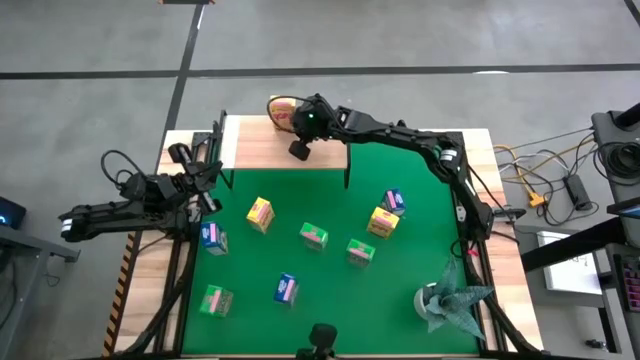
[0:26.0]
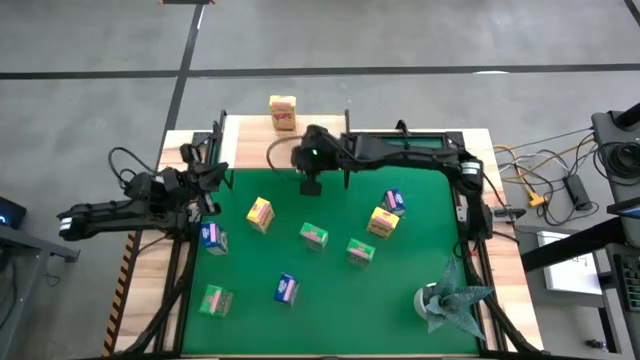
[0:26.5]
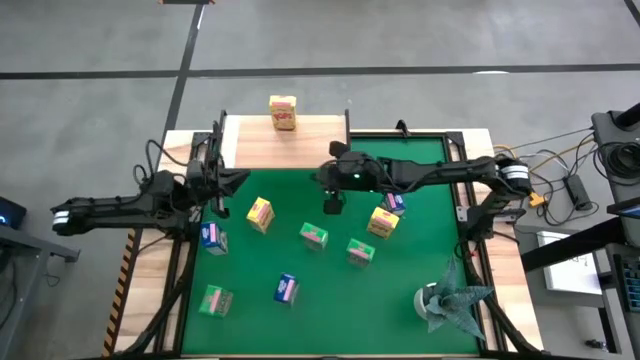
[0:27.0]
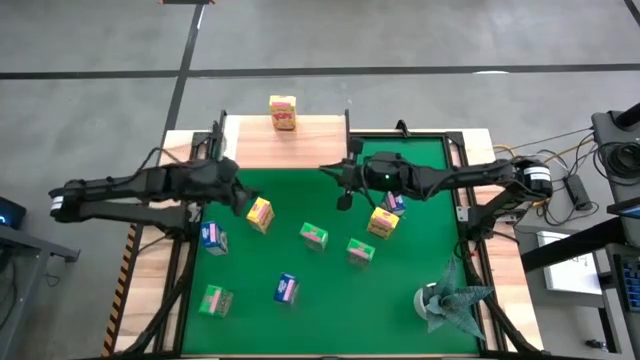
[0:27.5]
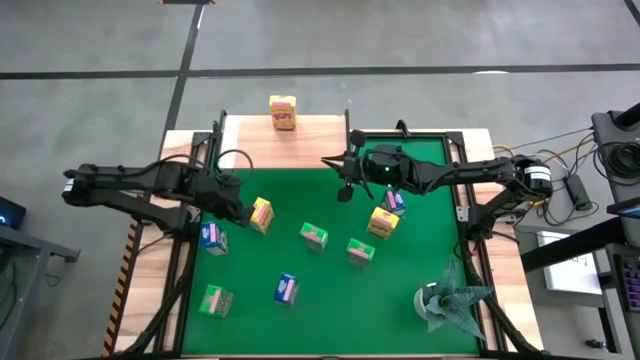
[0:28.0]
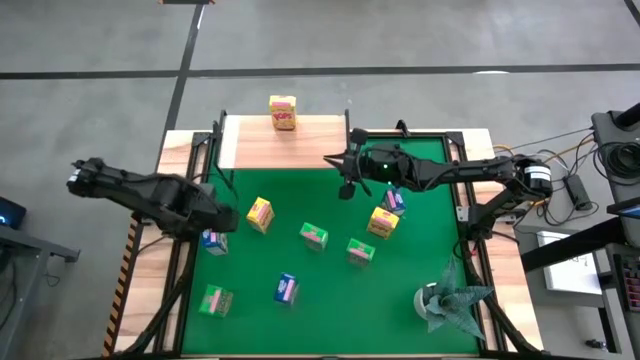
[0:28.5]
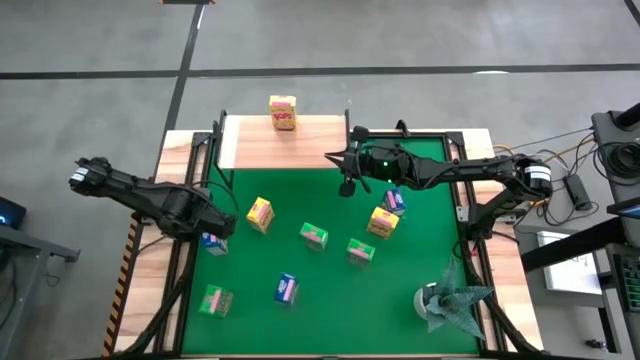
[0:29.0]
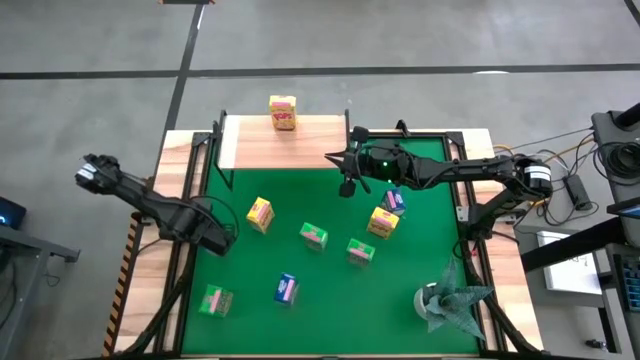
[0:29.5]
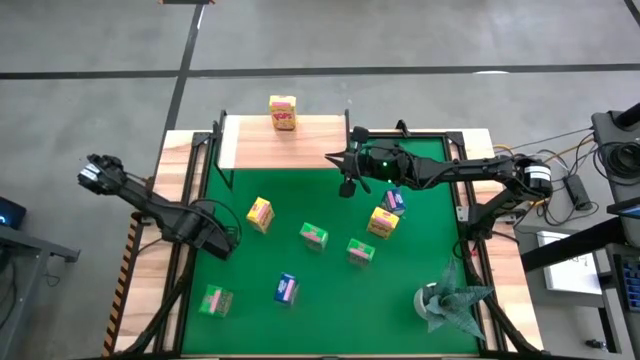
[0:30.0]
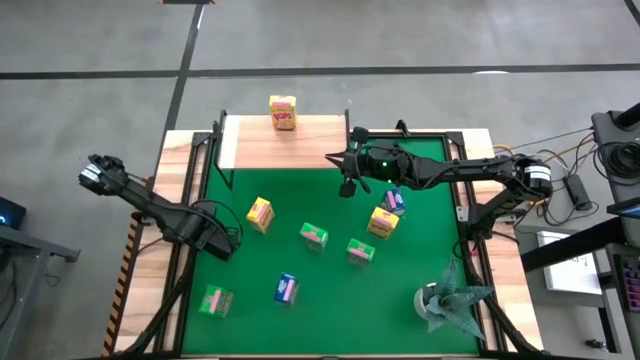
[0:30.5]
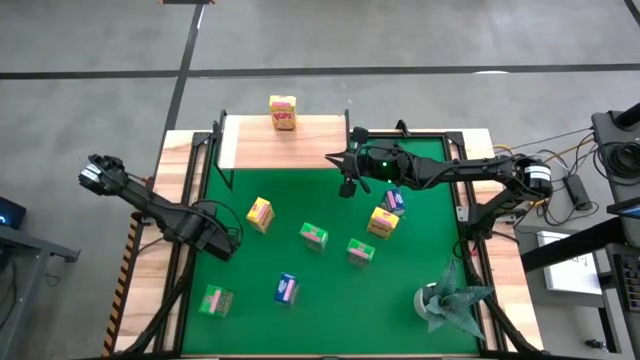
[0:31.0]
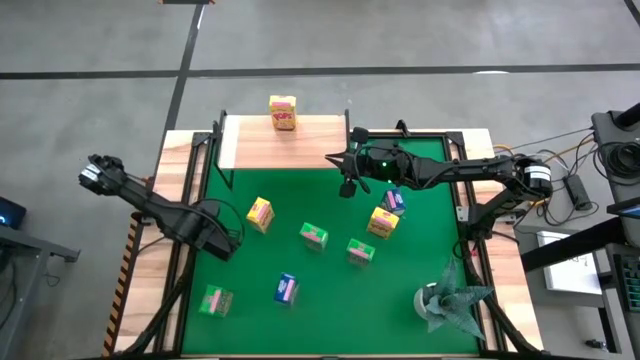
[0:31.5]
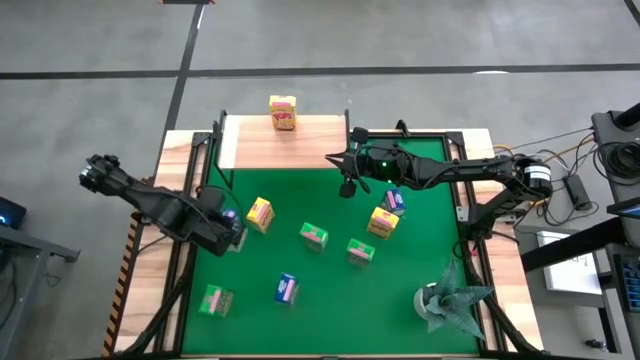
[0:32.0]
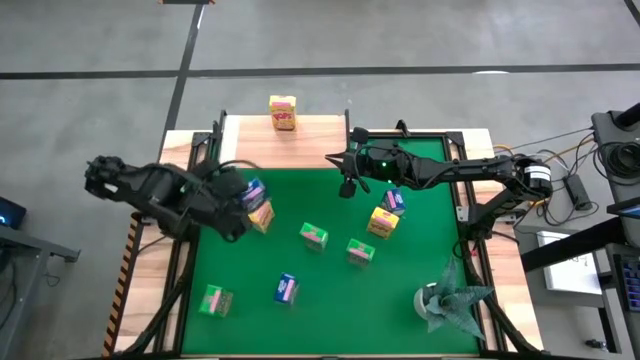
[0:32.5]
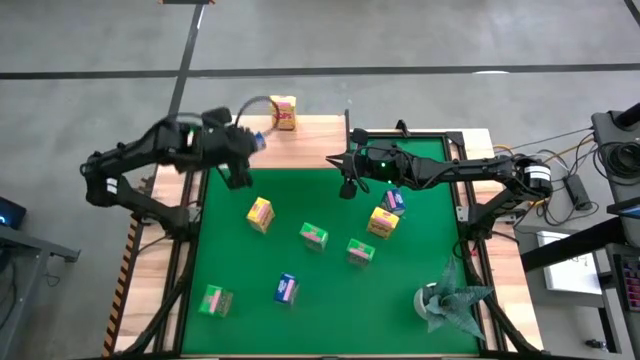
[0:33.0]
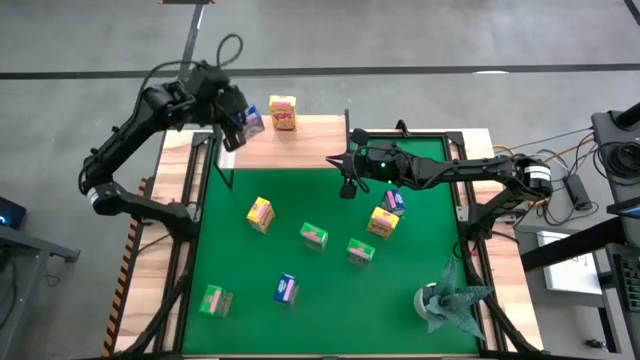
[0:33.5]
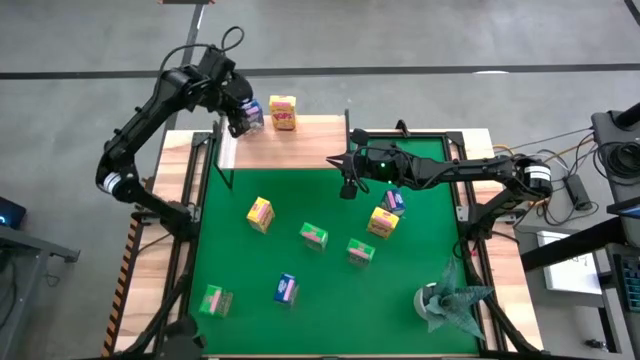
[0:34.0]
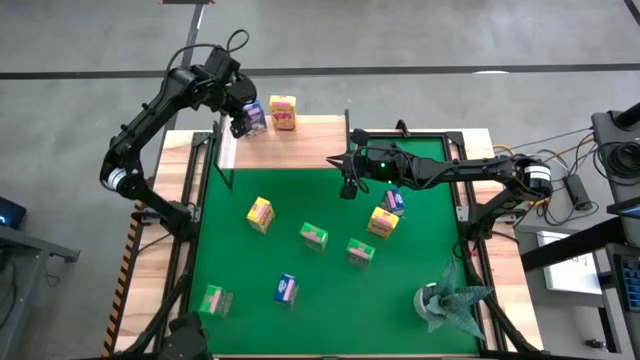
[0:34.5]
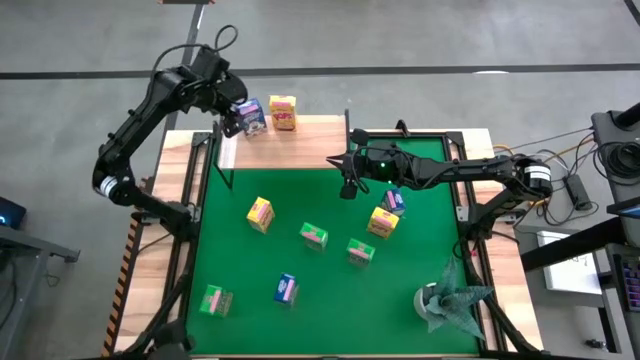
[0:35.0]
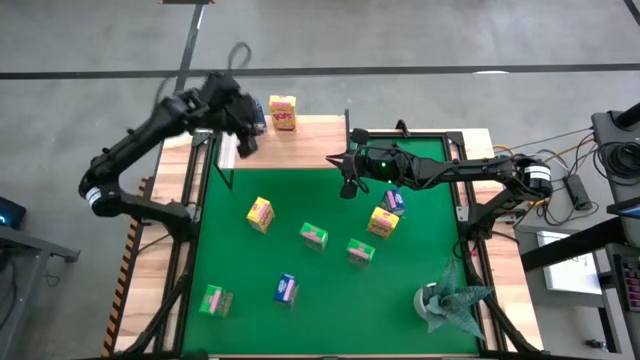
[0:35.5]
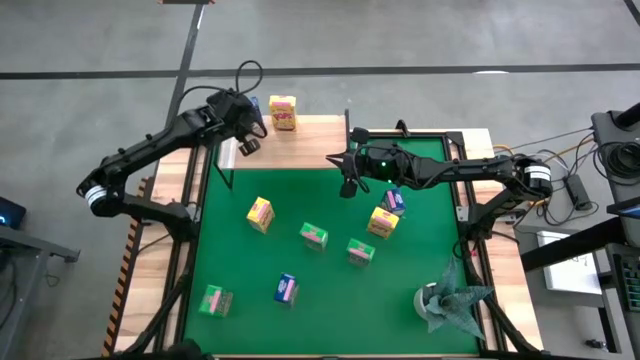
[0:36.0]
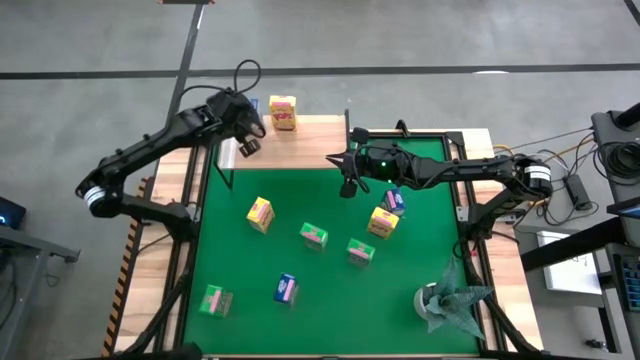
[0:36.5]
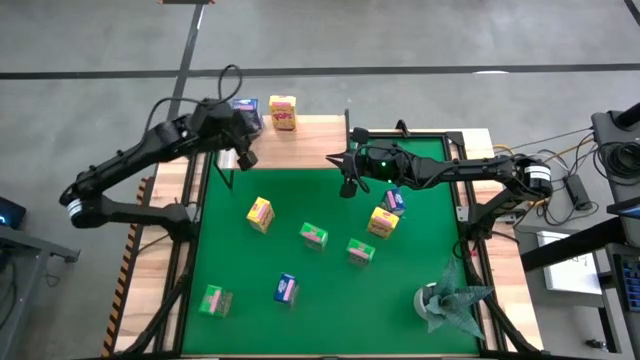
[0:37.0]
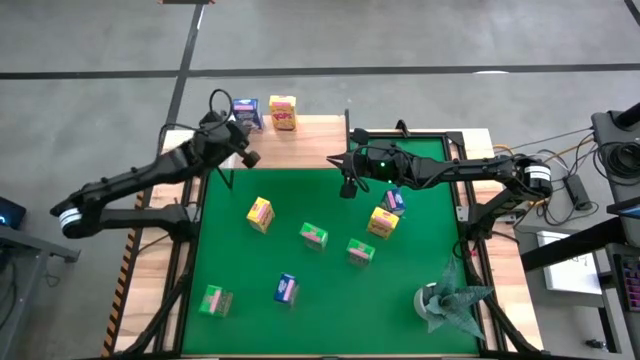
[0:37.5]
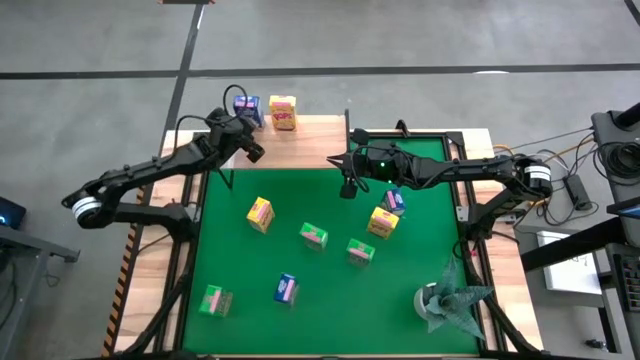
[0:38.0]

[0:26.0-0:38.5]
Task: Stack cereal on shelf
Put the middle blue cereal box on the shelf

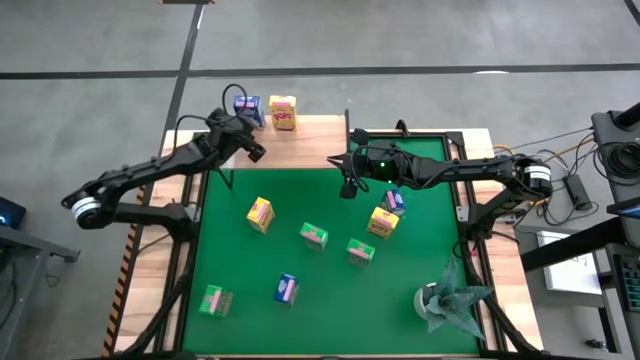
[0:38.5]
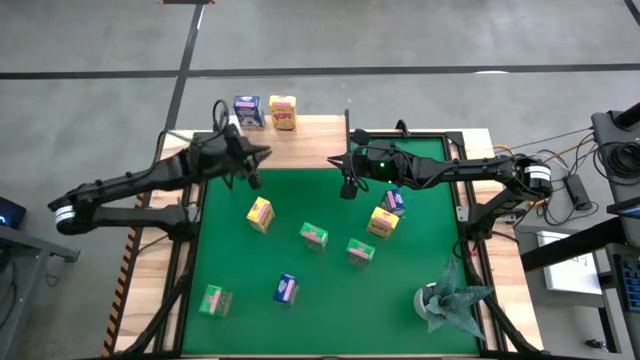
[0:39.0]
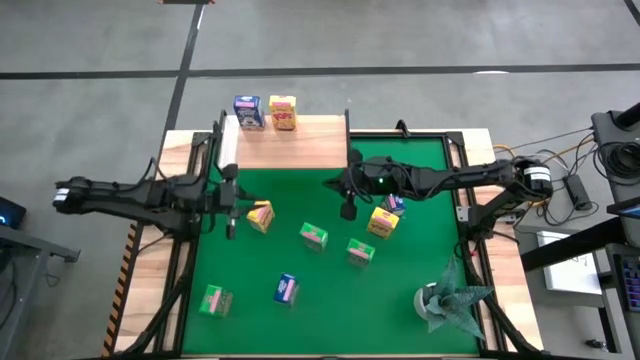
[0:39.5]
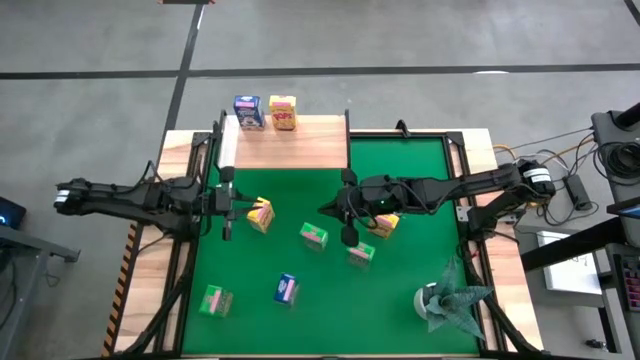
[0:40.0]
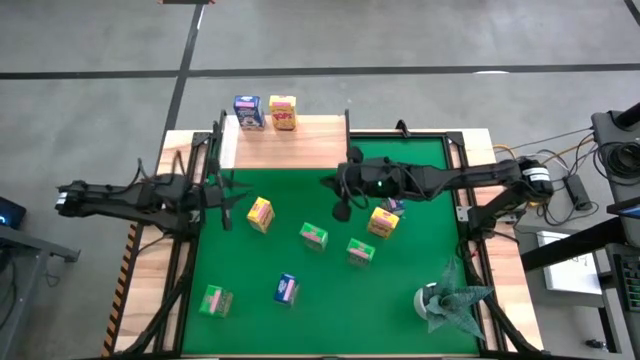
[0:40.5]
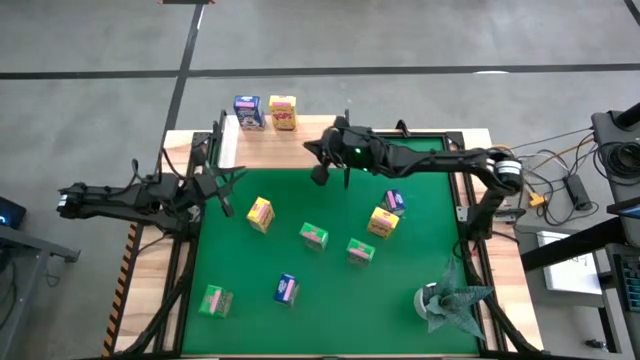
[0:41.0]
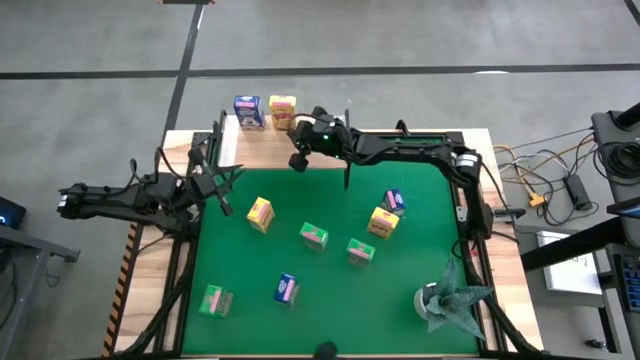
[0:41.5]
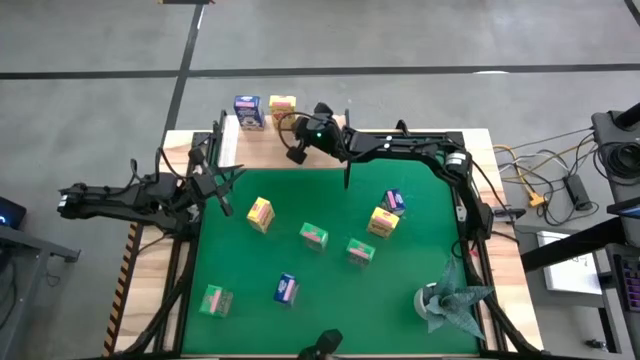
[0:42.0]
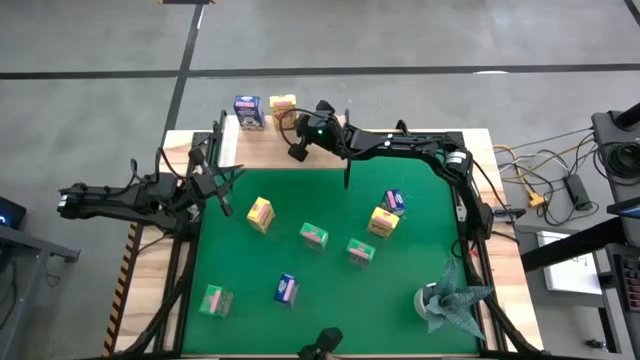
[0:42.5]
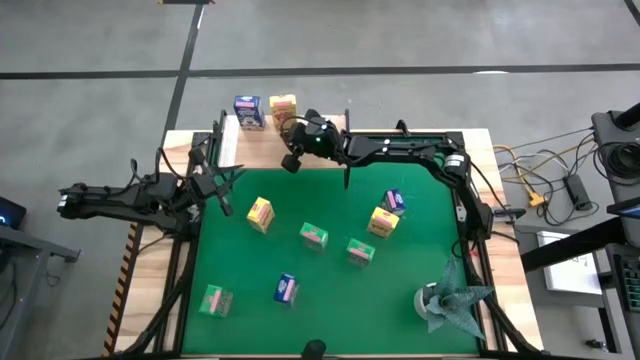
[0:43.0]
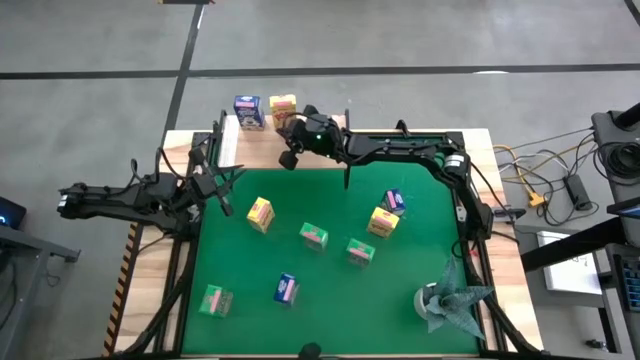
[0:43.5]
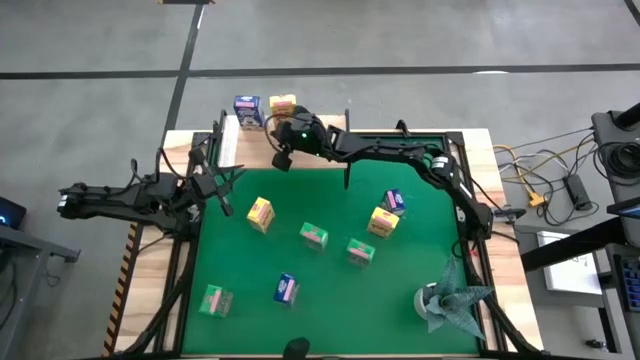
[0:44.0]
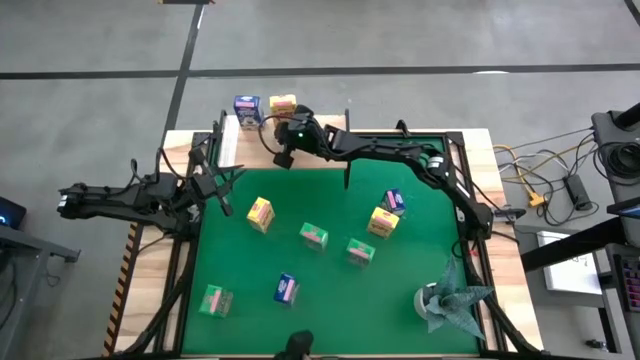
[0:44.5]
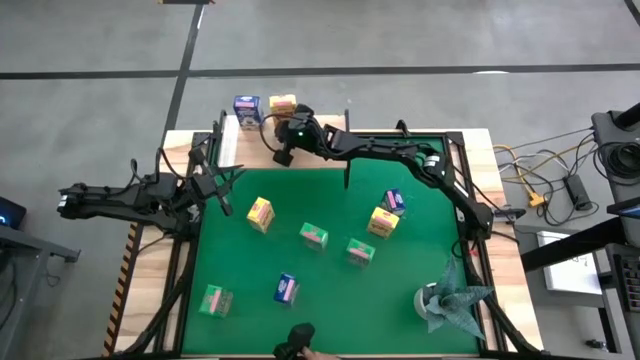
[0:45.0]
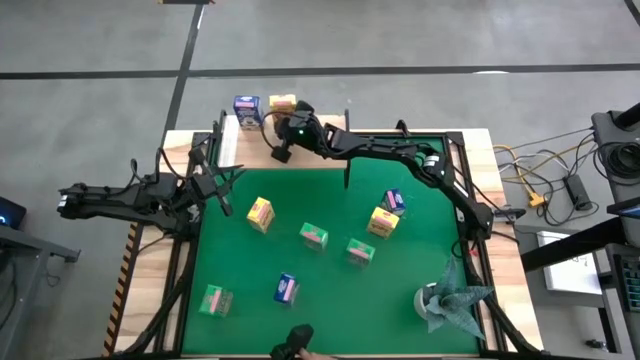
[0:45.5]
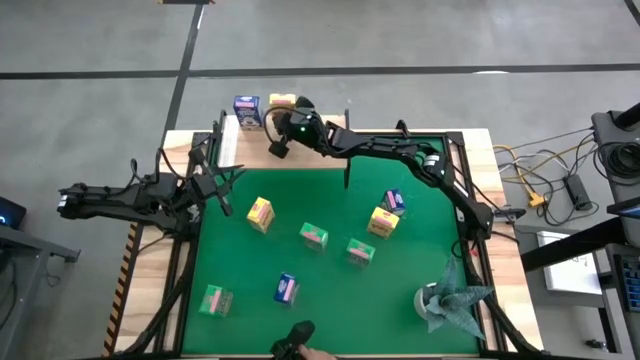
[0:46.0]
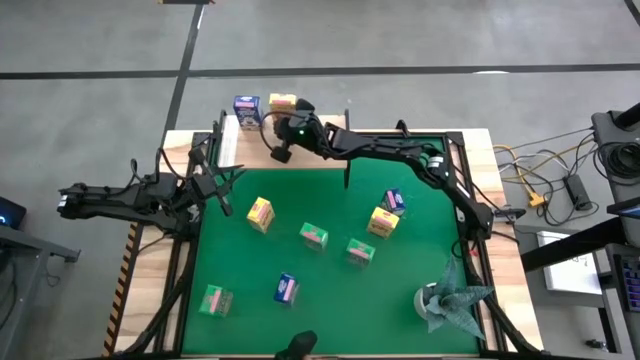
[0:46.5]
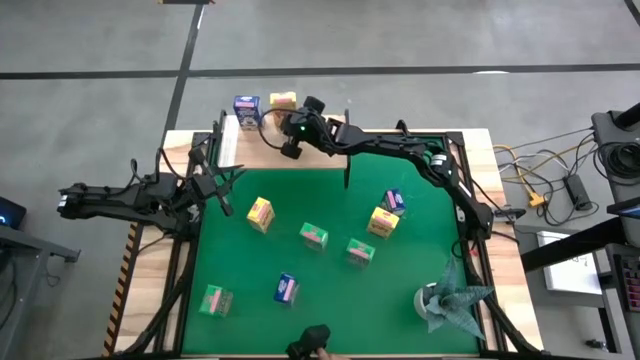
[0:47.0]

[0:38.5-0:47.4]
Adjust the yellow cereal box on the shelf
